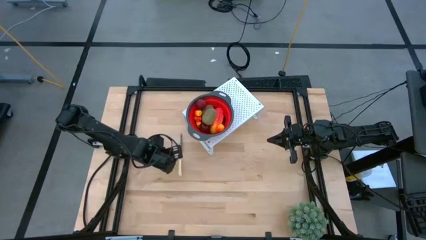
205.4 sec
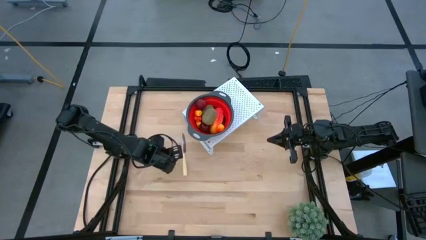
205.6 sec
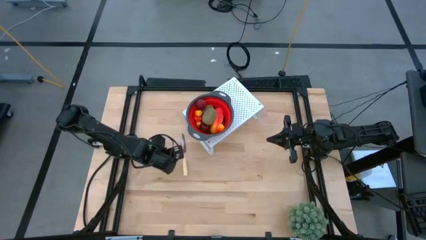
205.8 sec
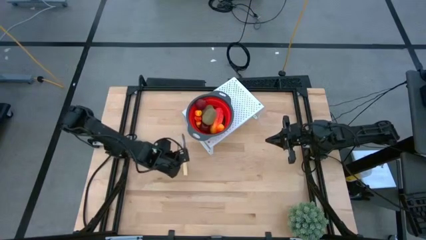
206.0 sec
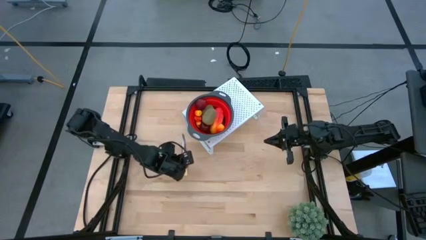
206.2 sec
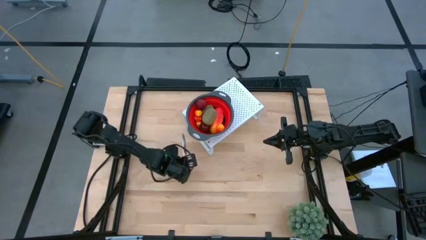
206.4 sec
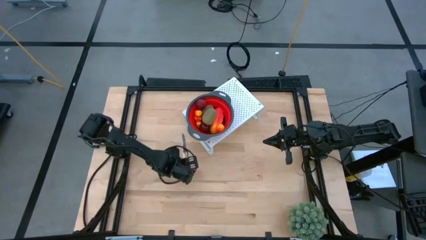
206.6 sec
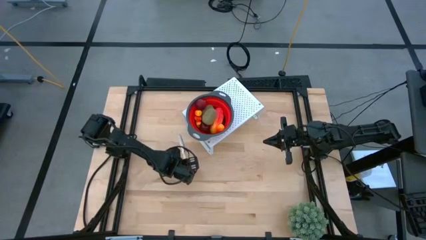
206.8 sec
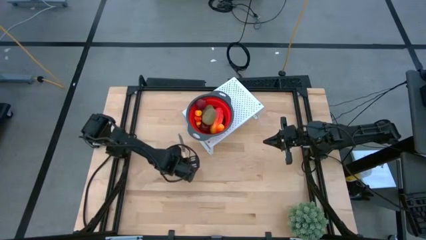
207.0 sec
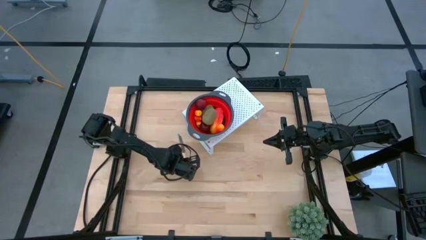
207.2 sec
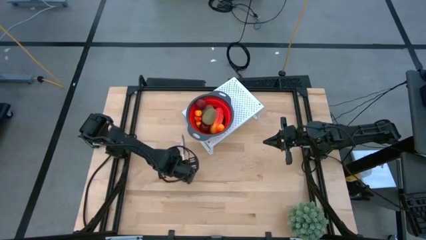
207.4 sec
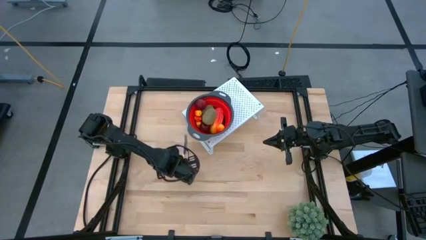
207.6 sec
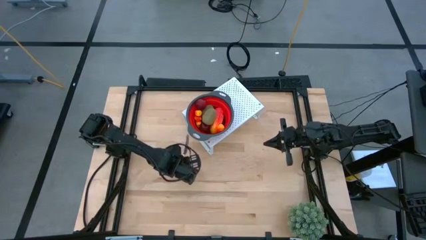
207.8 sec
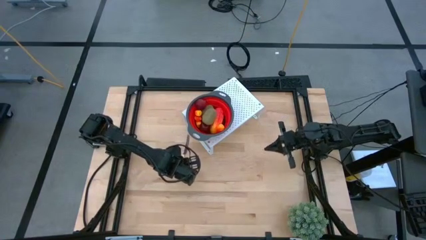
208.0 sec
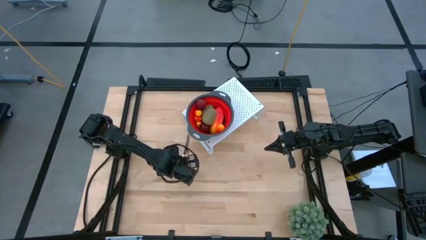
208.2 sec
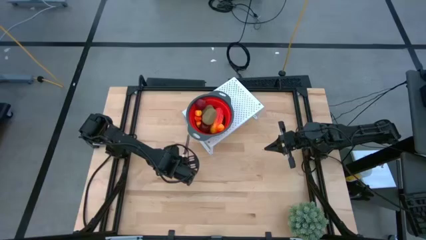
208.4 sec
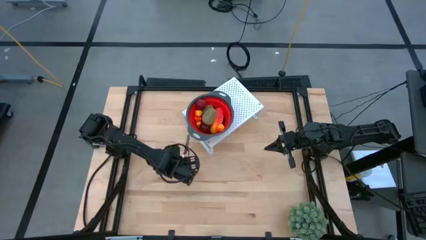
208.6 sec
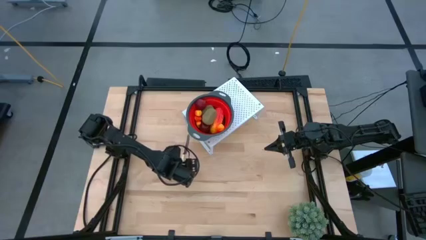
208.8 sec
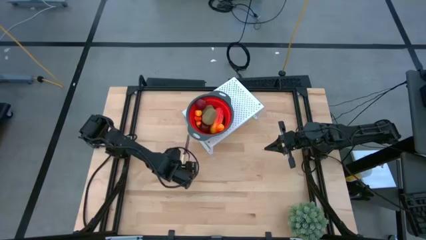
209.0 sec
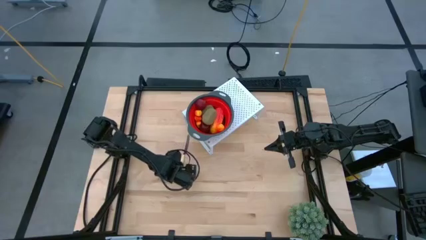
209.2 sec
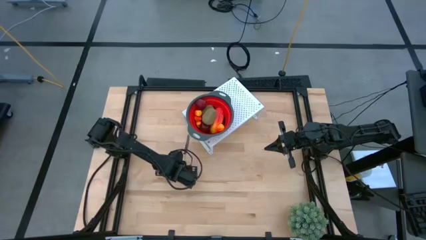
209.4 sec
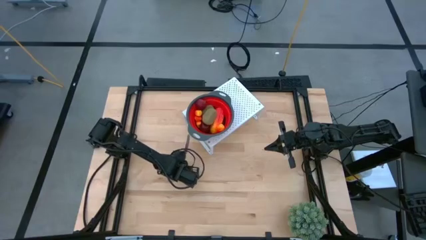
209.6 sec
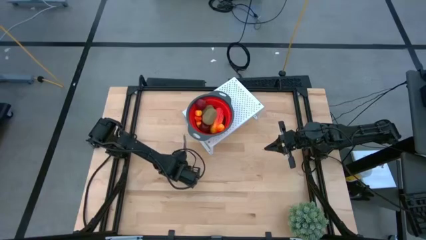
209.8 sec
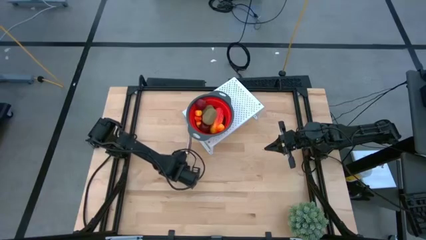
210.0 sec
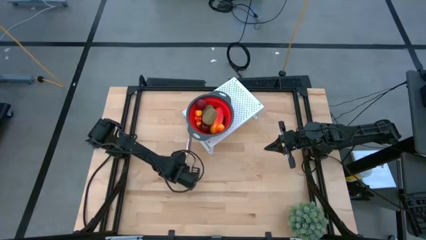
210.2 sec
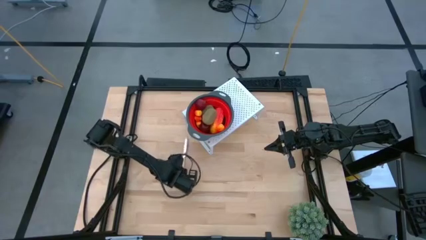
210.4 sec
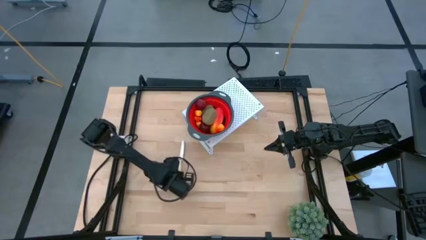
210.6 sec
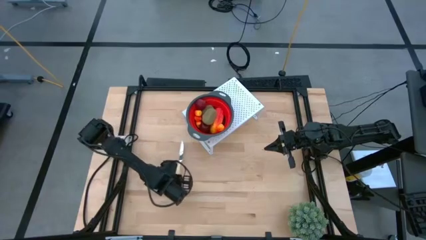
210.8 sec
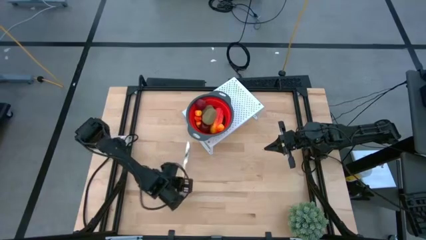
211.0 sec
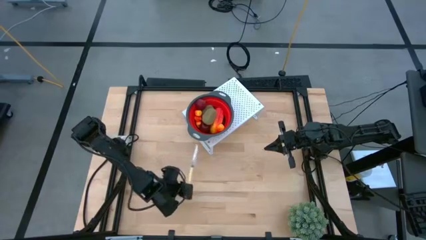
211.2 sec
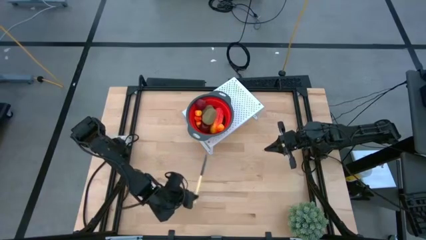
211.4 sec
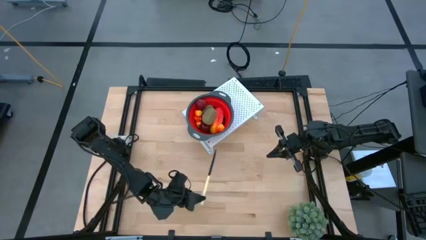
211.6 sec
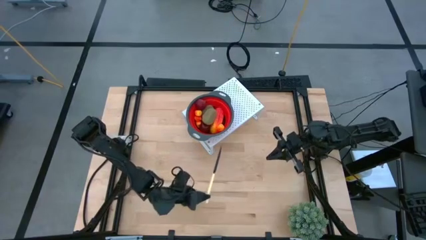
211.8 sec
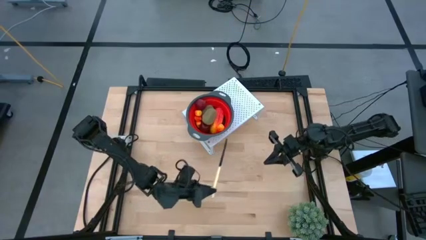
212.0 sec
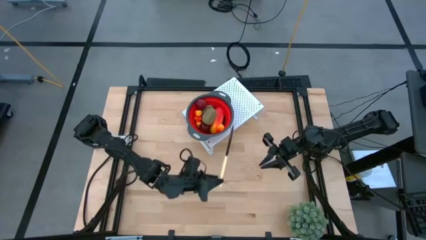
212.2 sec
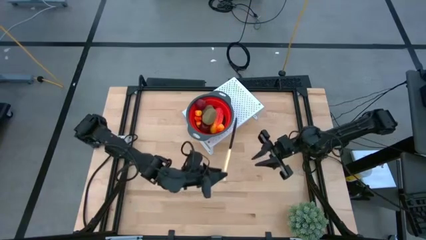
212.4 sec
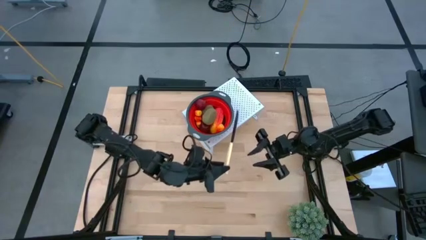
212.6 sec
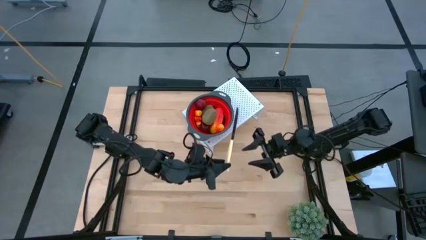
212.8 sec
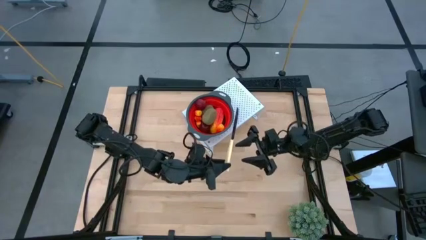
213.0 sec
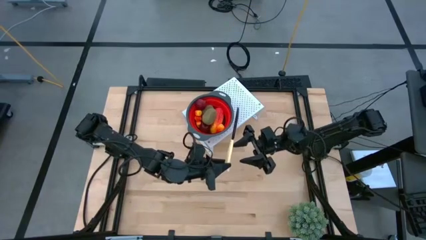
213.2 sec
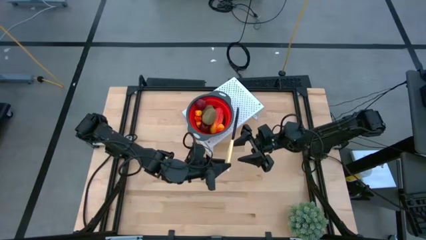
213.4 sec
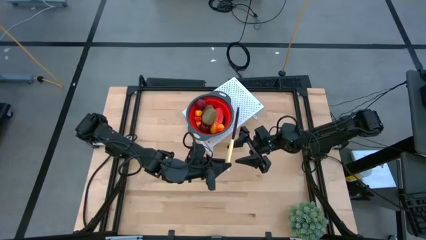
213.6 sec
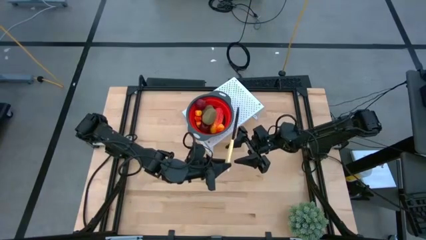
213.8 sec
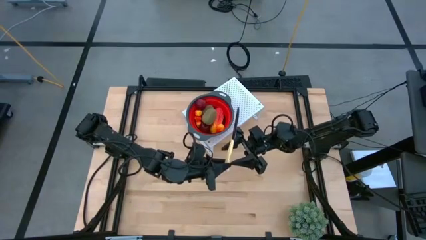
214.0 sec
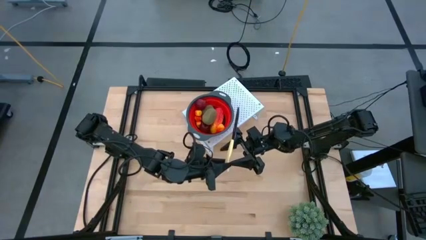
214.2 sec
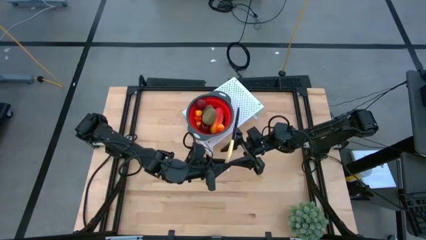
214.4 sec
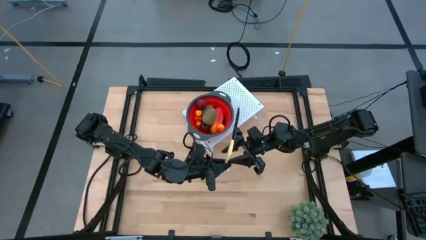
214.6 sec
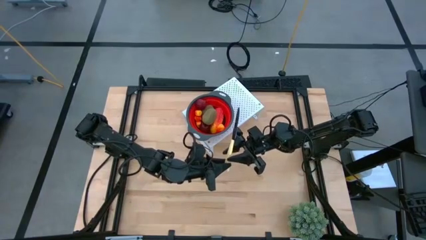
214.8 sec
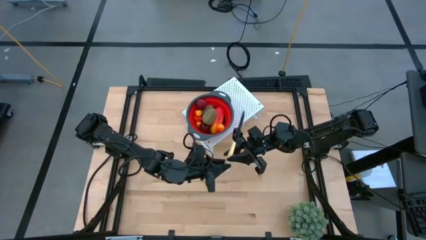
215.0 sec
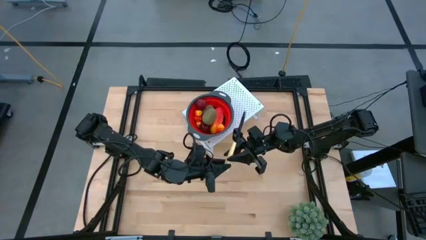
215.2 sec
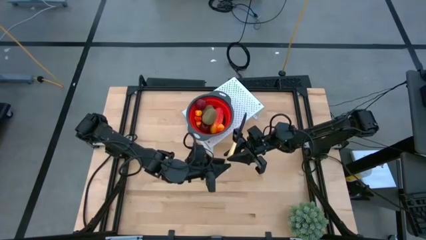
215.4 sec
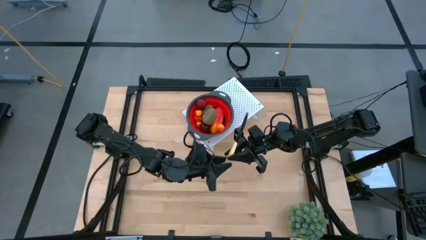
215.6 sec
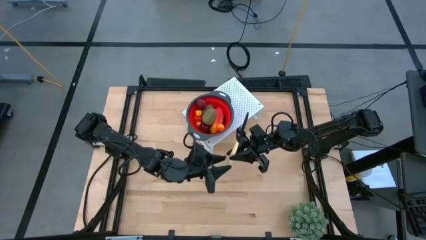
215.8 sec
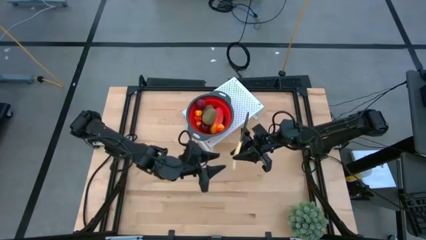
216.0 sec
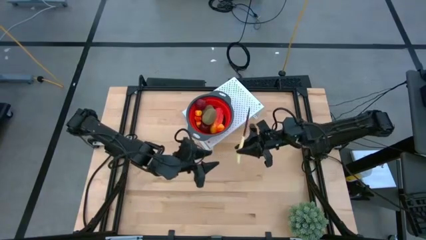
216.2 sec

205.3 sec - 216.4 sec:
Task: Pick & Place Fruit
Put the yellow table knife on the shelf

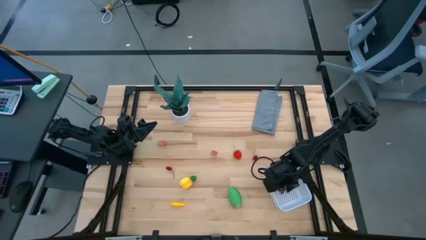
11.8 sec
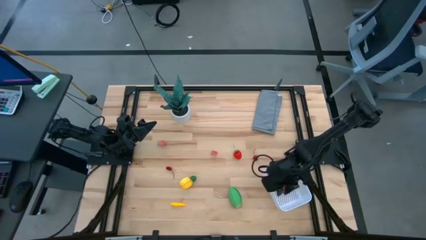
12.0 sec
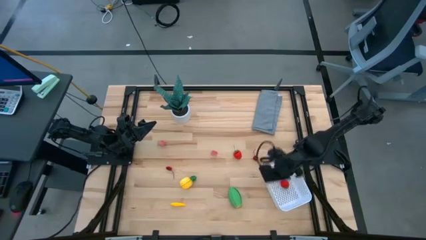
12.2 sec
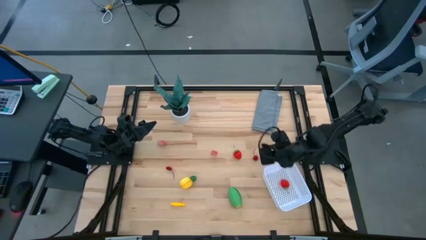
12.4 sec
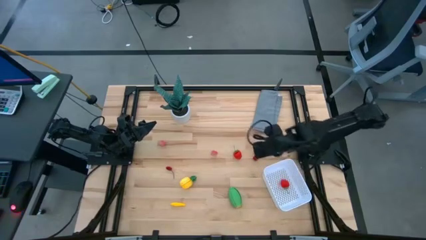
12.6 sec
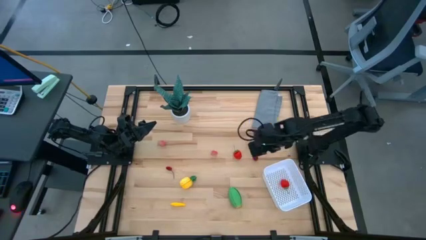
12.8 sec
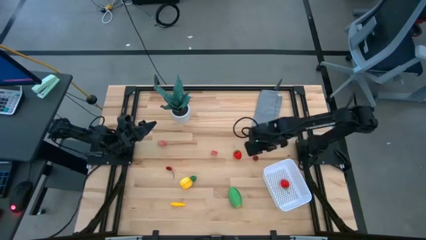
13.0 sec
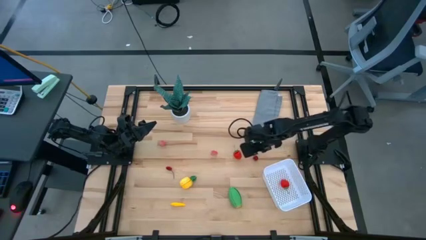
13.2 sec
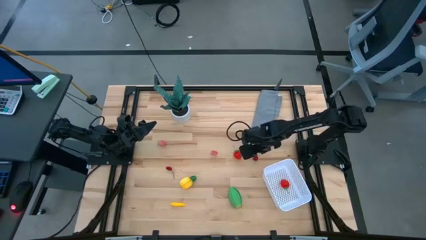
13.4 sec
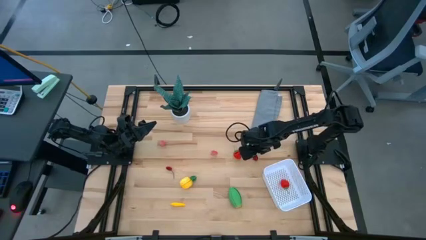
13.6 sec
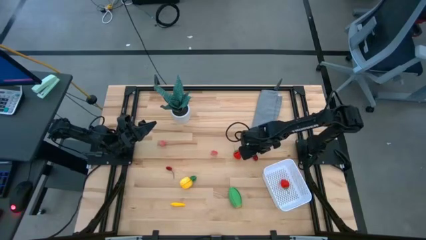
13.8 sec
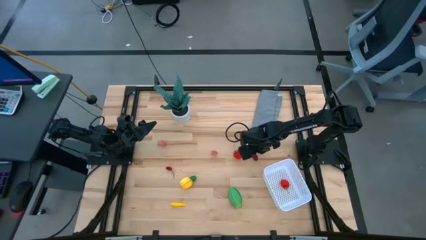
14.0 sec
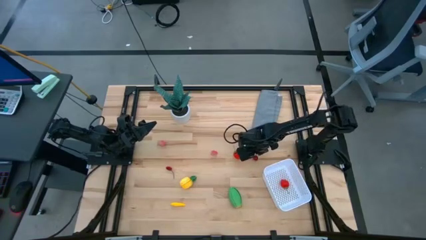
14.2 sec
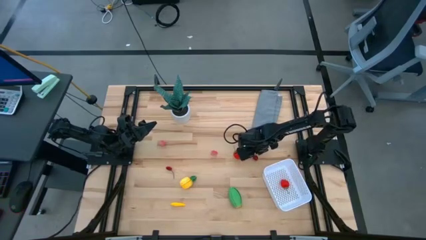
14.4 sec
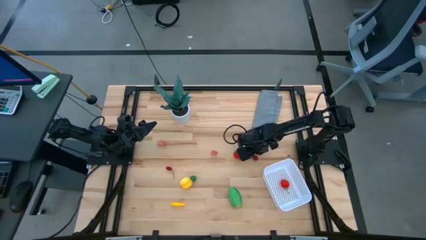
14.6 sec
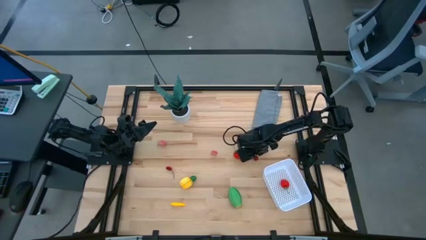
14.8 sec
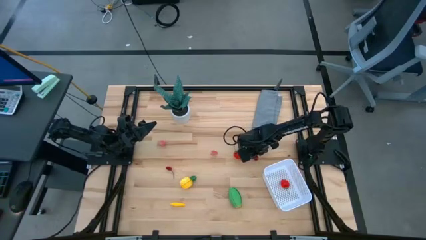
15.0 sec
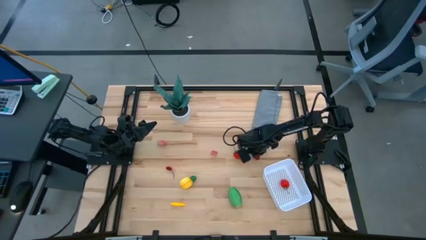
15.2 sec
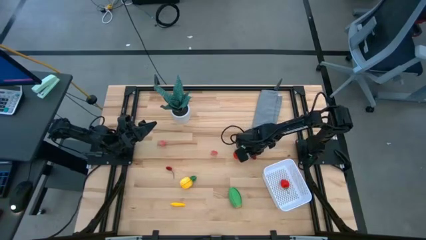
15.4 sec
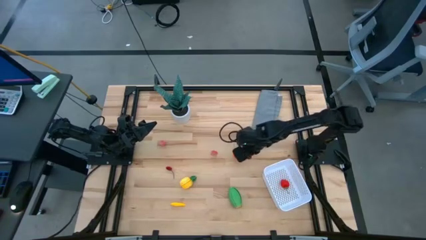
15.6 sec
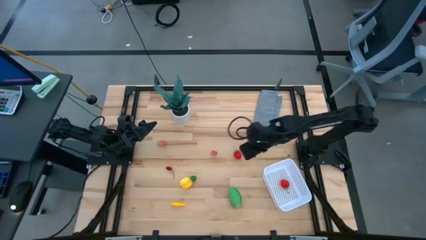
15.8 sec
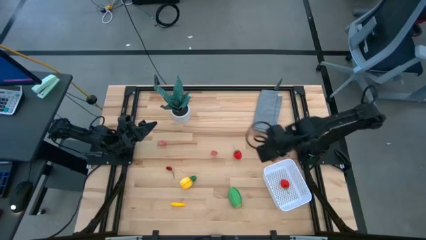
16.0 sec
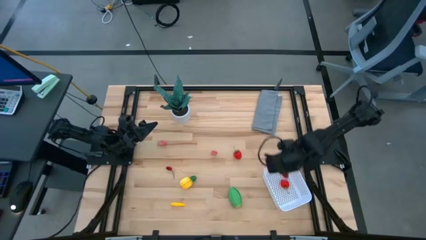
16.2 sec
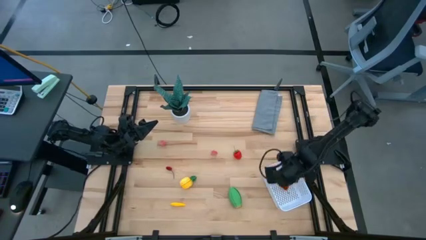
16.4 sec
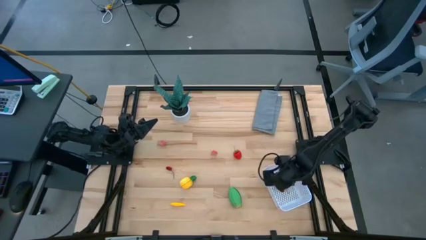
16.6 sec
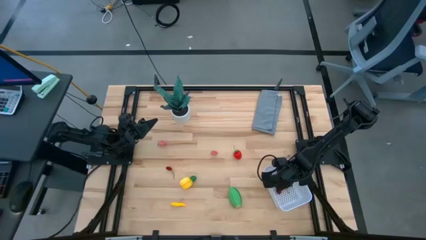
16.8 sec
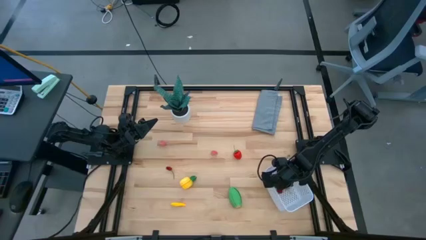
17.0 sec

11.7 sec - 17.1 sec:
Task: Pick and placing Produce into tupperware
Put the right red cherry into the white basket
